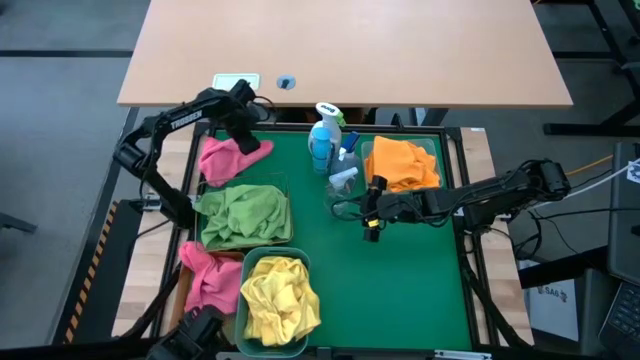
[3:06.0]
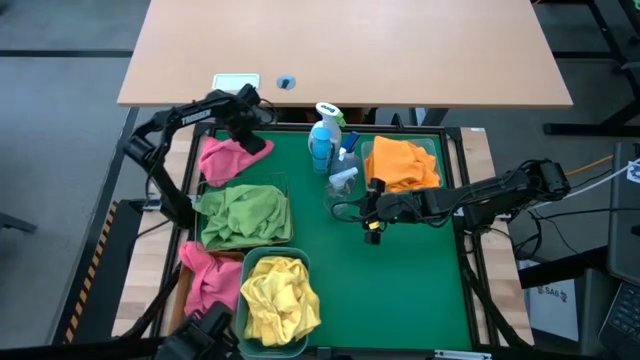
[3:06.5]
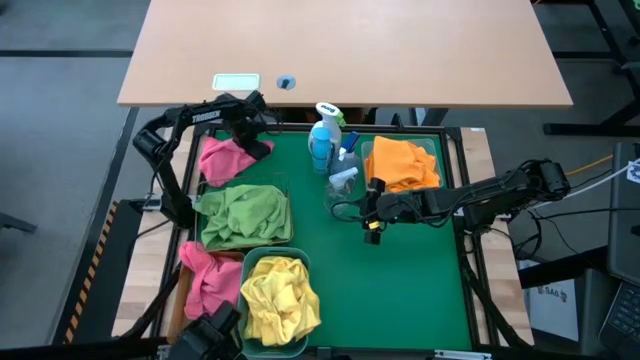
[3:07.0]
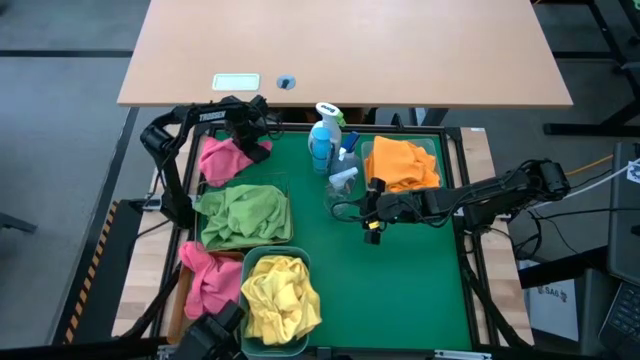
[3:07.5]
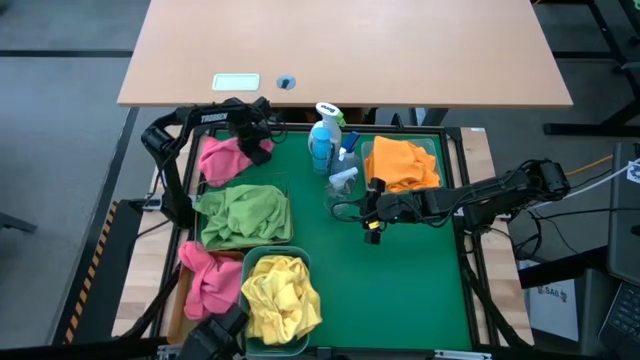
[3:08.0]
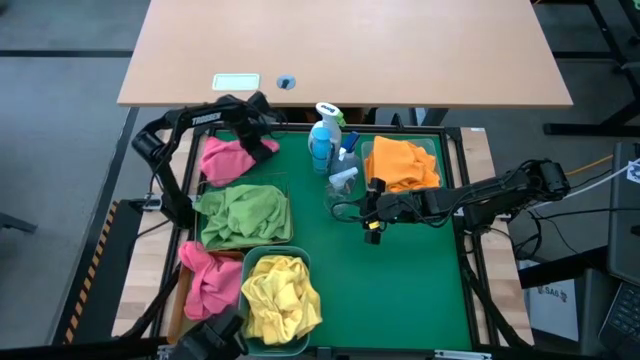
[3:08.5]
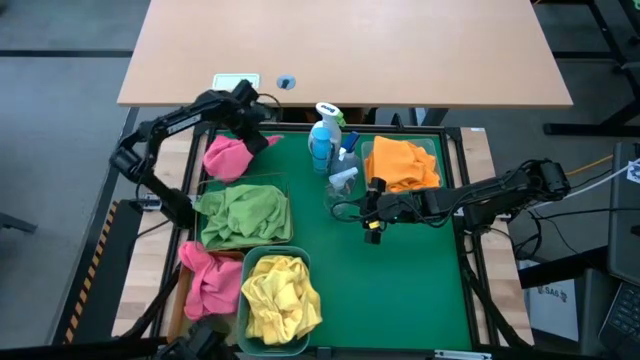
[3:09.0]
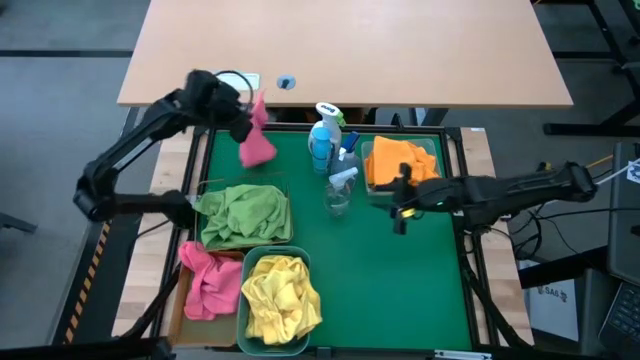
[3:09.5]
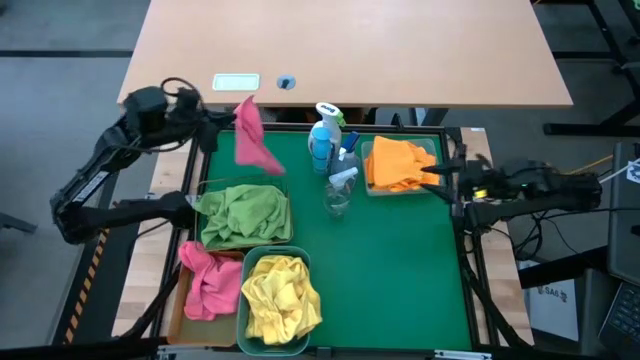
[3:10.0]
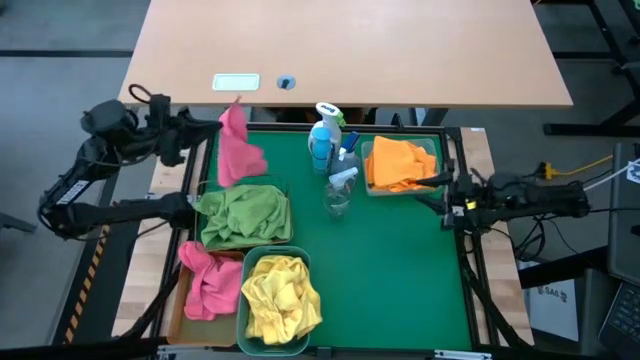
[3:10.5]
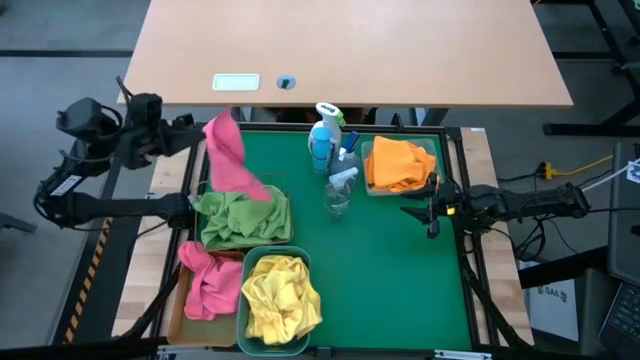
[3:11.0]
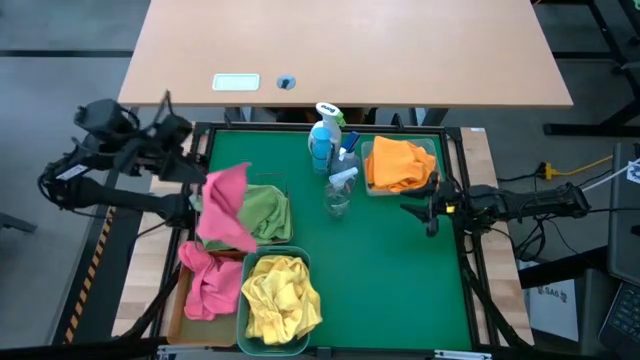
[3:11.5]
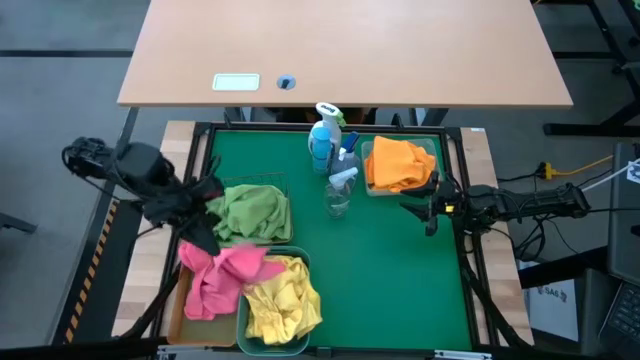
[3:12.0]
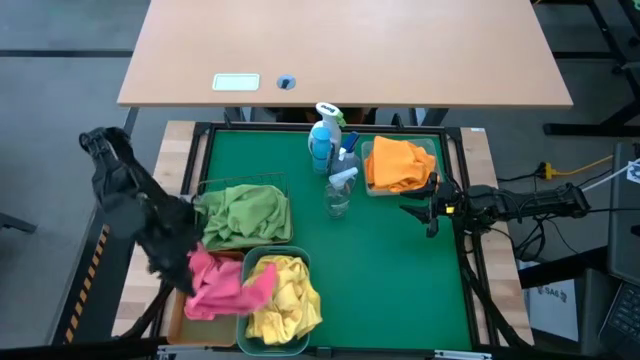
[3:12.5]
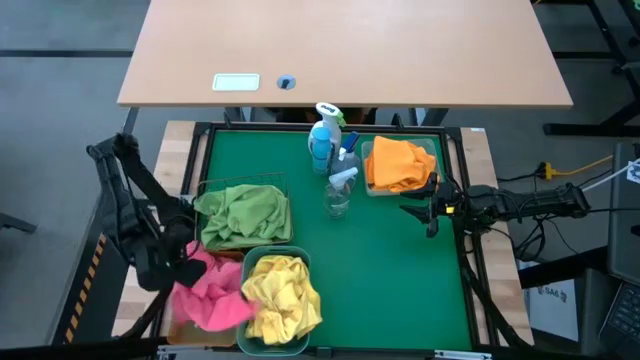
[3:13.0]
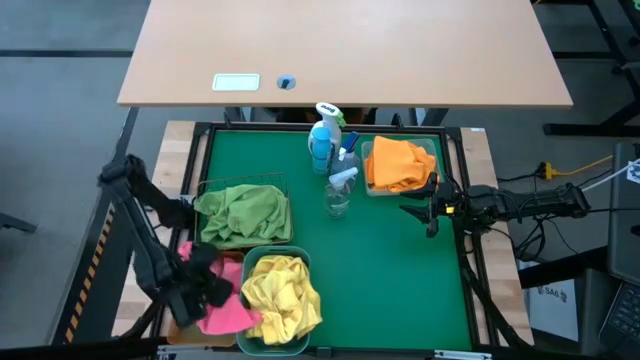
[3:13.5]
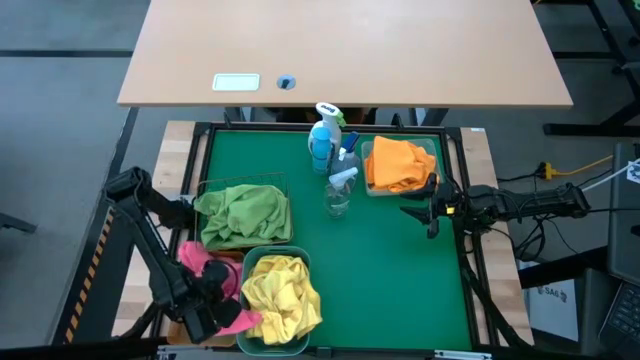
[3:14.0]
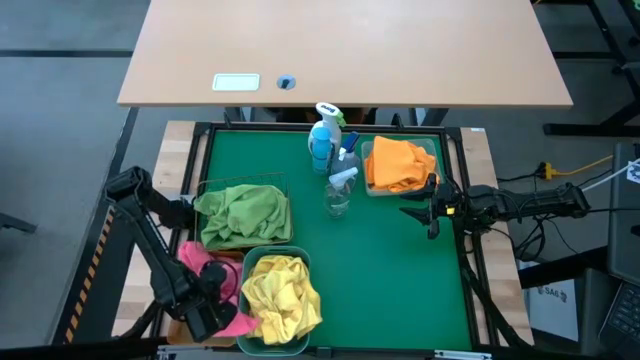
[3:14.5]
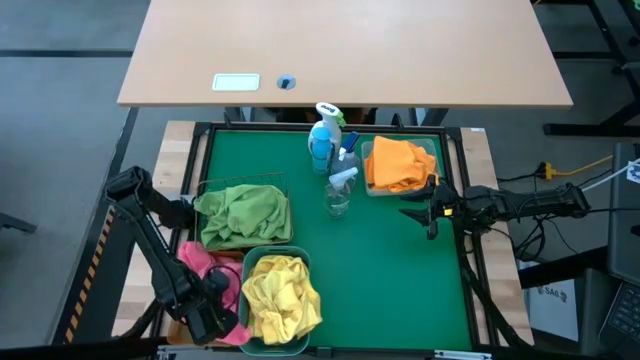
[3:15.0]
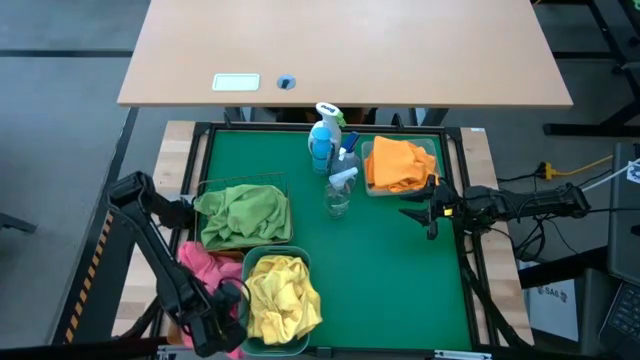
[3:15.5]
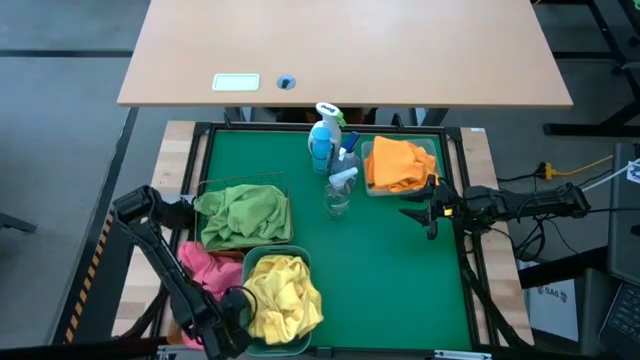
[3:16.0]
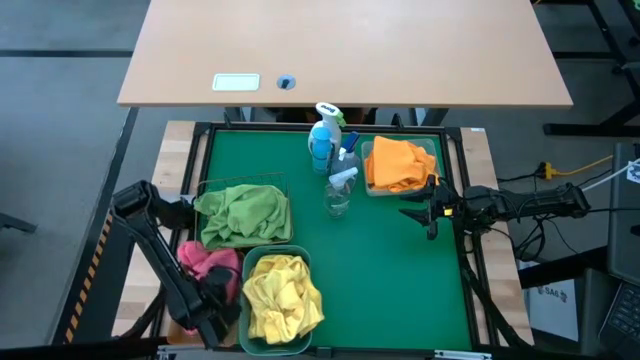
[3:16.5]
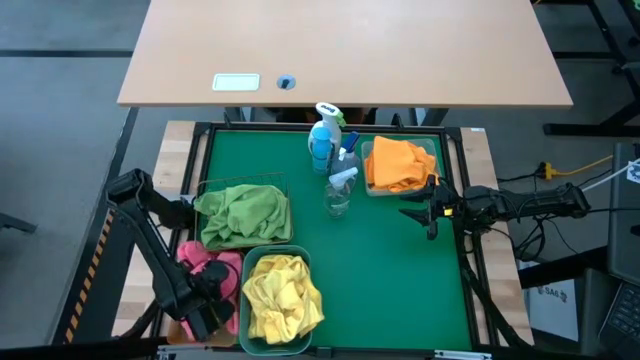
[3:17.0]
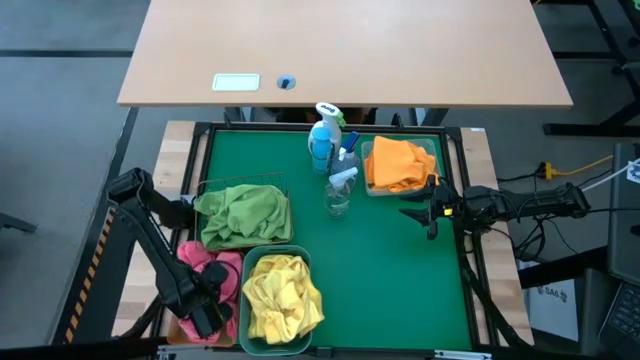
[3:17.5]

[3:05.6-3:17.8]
Task: Sort microfiber towel by color & place in baskets
Put the pink towel into the orange bin

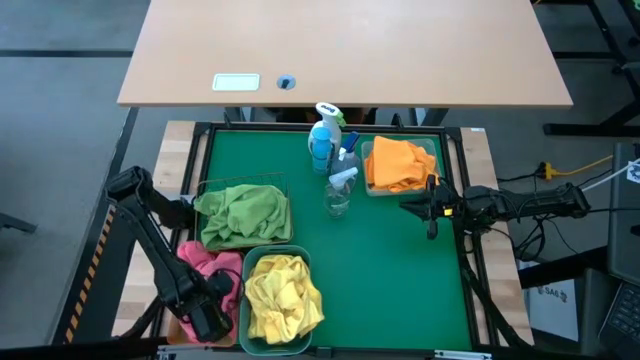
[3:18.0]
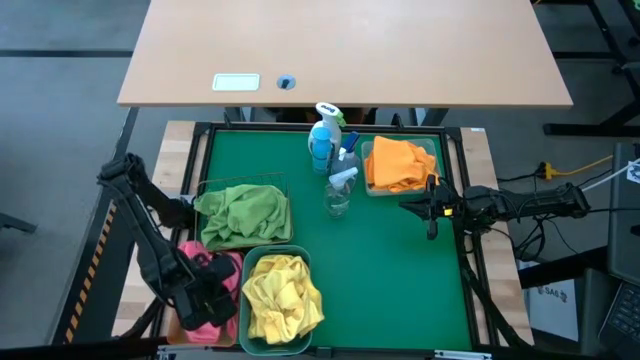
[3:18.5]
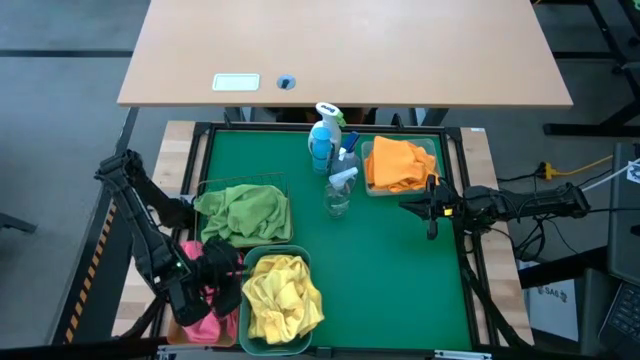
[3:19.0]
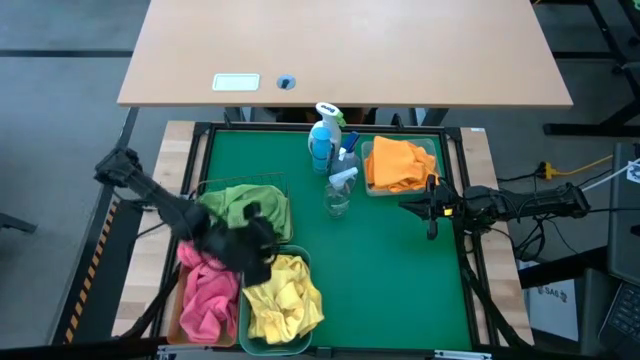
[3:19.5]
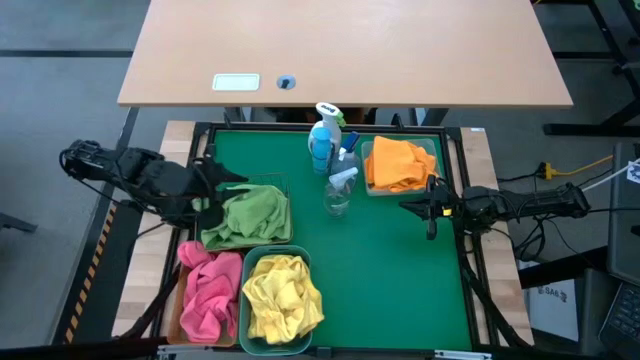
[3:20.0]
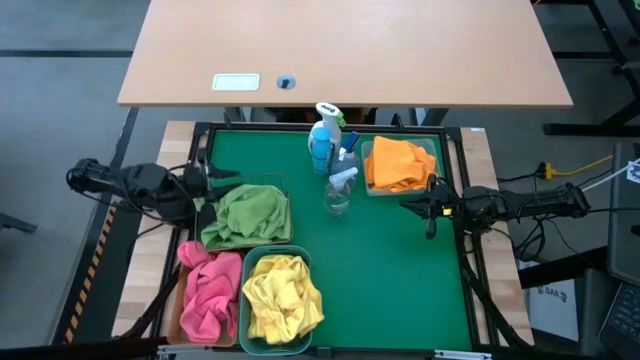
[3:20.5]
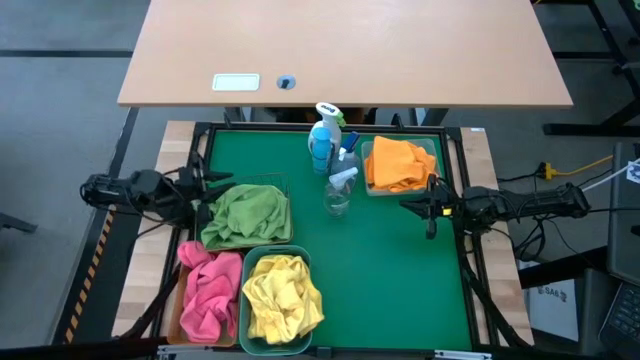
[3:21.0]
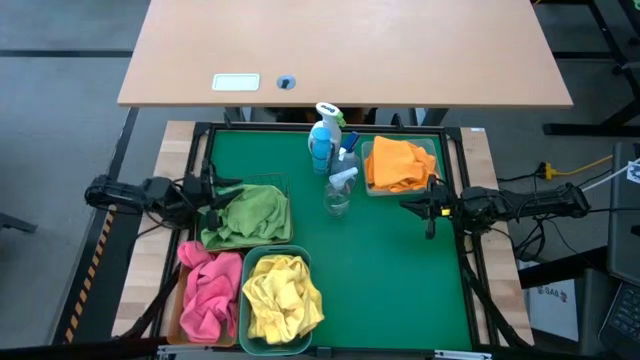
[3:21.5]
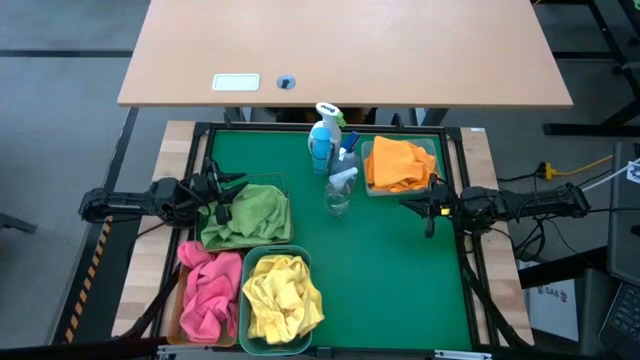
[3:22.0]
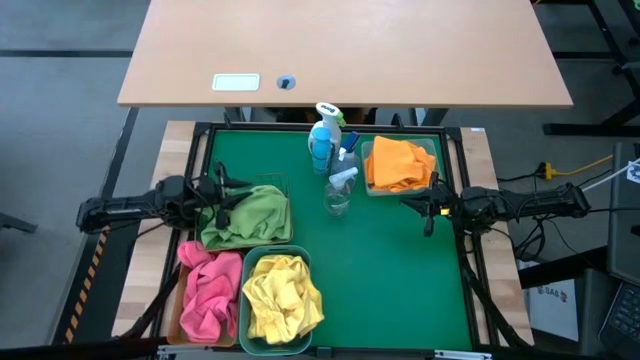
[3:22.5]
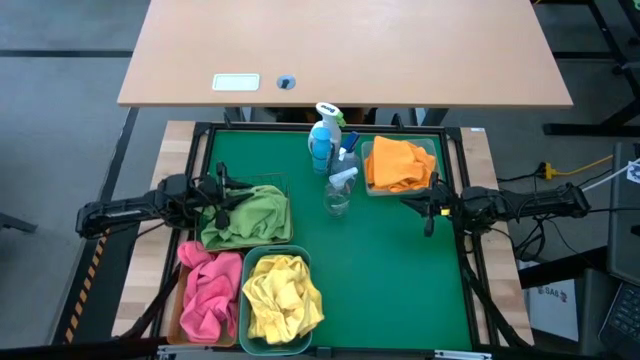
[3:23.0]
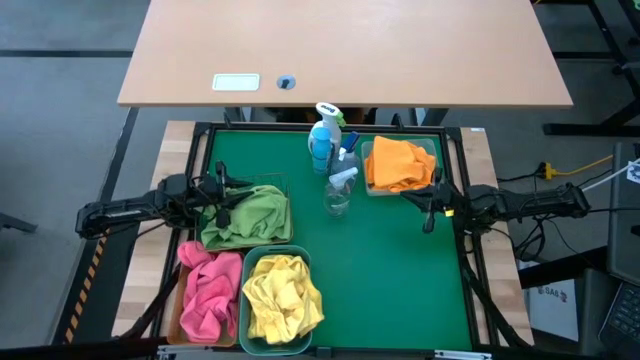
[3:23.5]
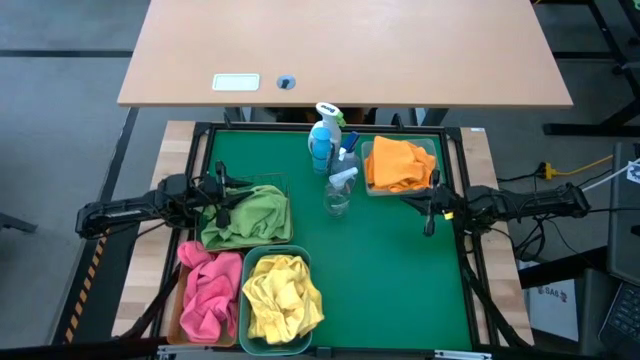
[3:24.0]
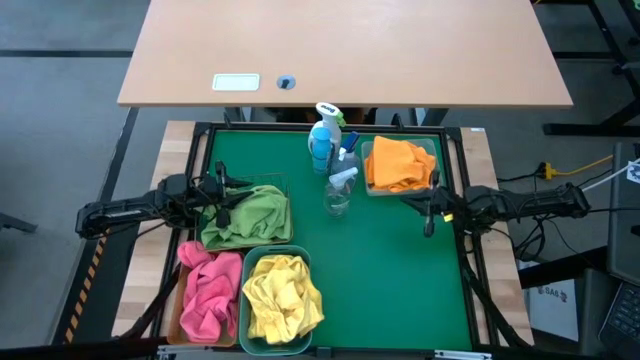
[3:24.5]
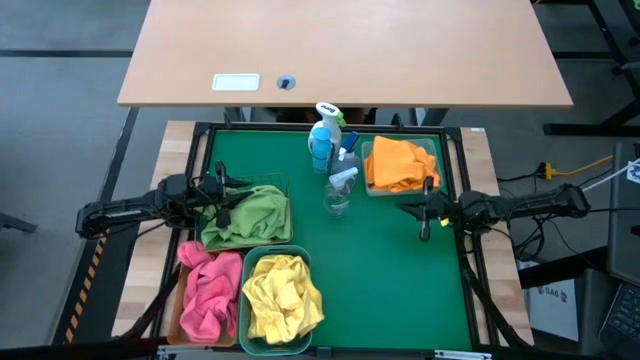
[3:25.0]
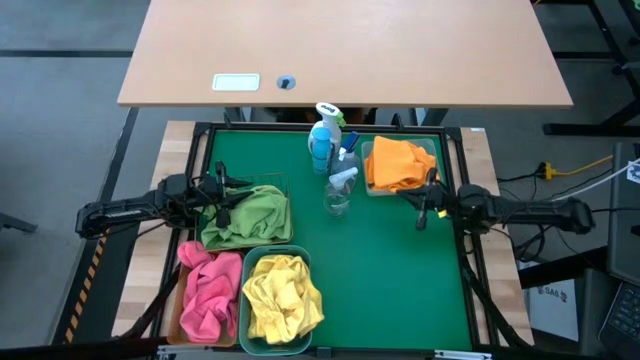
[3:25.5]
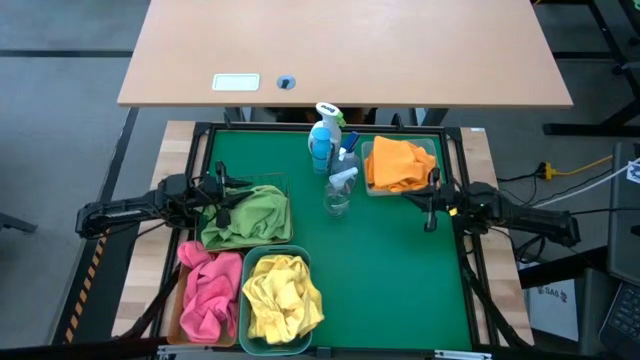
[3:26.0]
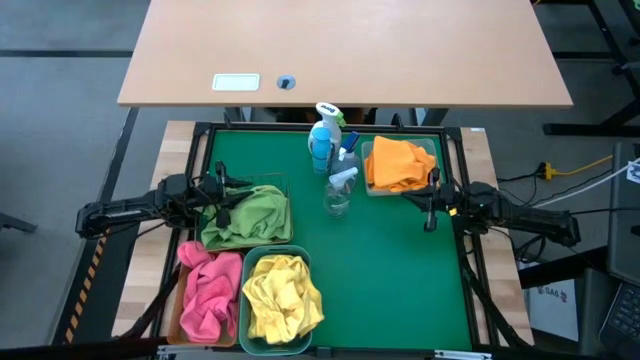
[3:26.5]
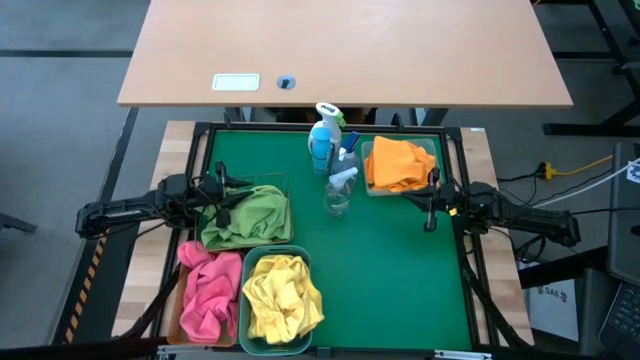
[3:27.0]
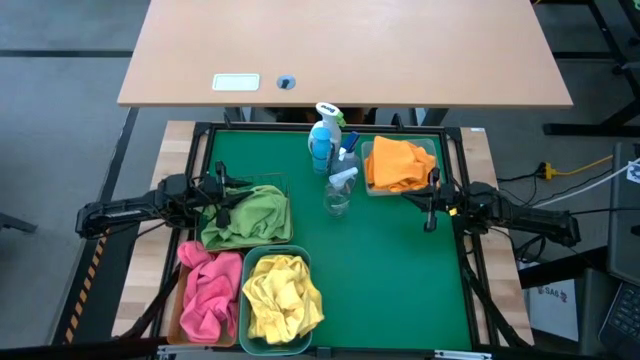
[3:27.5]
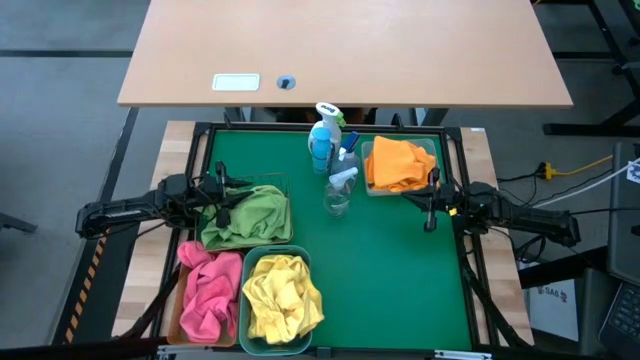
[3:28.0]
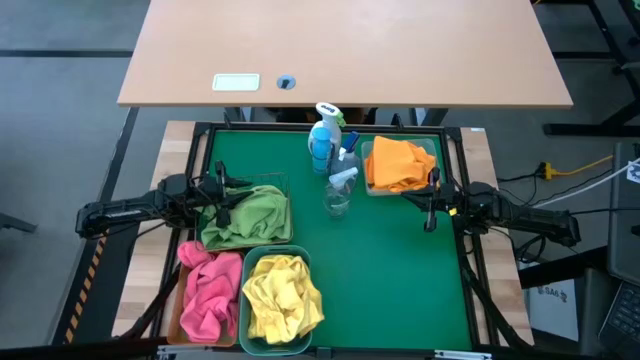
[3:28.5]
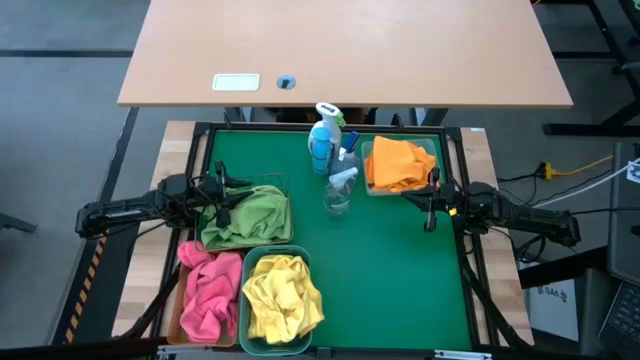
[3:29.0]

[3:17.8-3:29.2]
Return to Home Position
